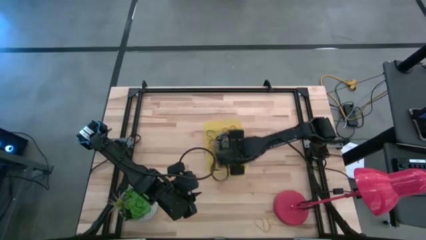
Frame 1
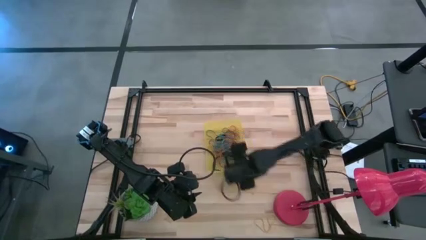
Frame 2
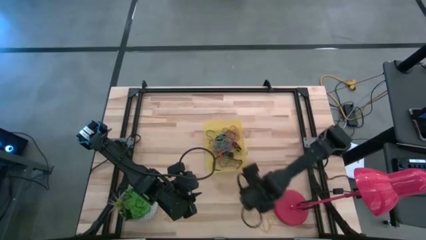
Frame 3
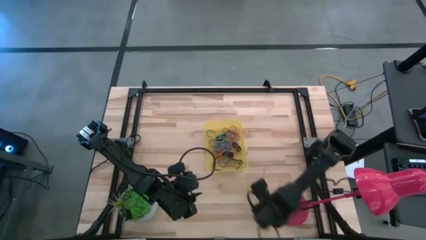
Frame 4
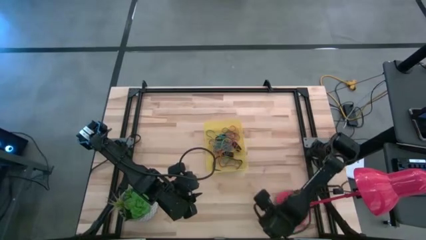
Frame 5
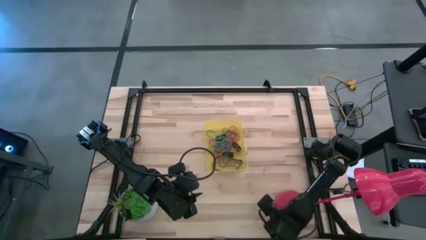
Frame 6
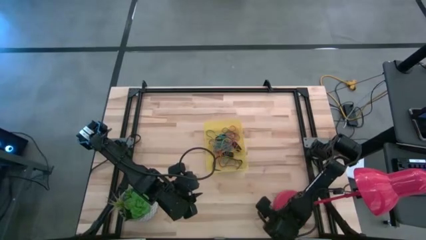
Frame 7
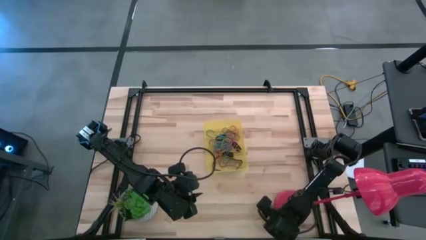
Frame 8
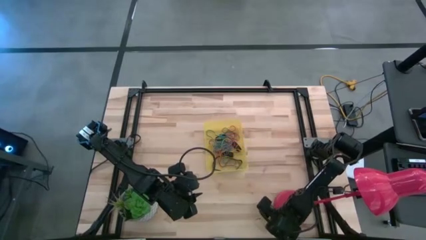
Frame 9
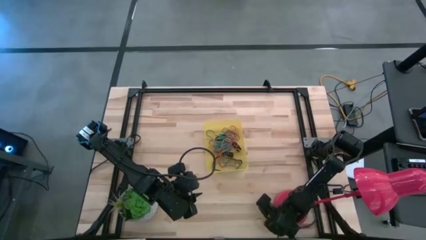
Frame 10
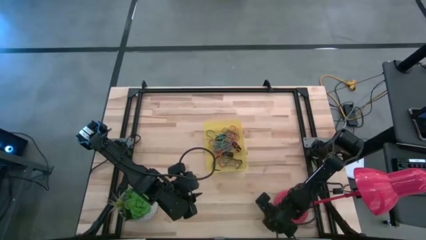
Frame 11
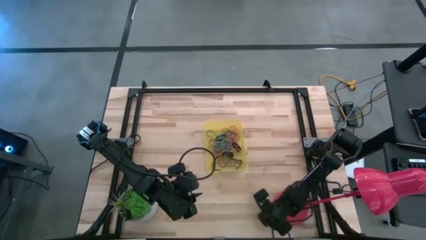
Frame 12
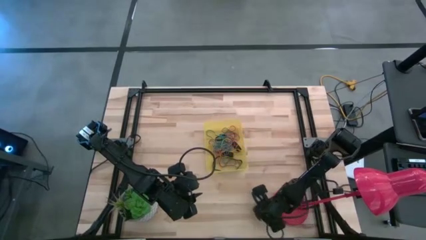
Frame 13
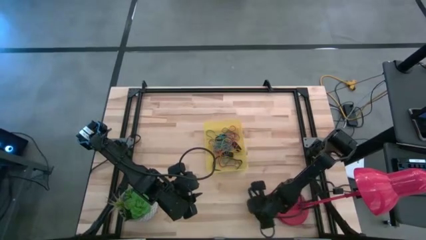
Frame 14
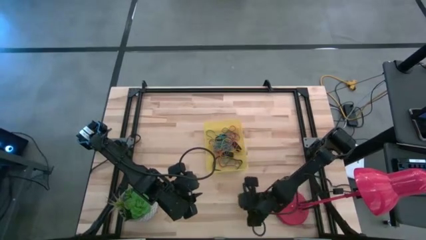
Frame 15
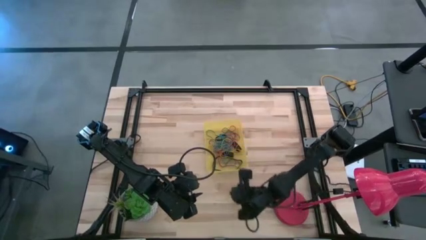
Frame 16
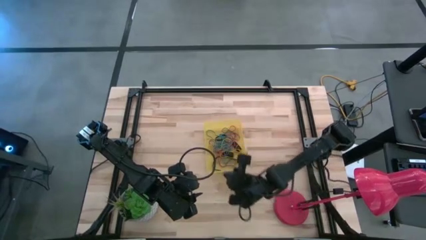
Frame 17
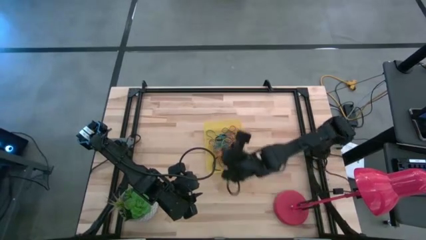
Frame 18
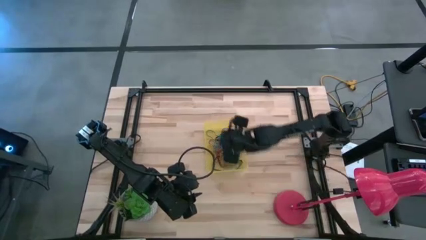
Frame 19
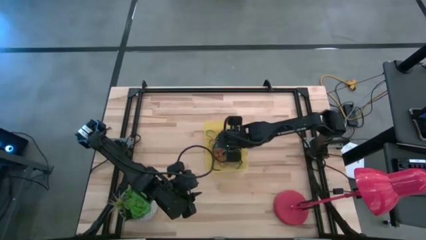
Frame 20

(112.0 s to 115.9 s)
Task: Pick and place rubber bands into bin
Put the yellow rubber band into the yellow bin

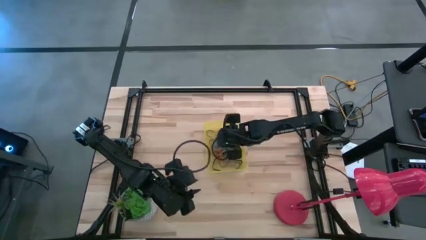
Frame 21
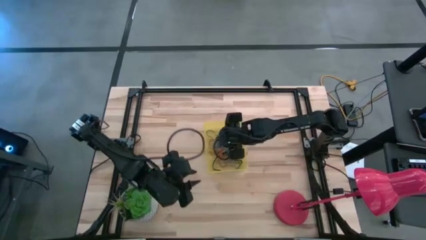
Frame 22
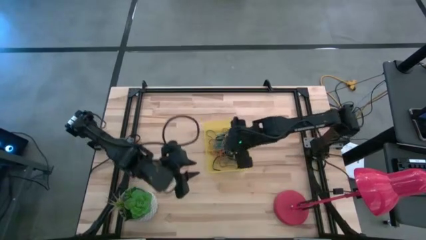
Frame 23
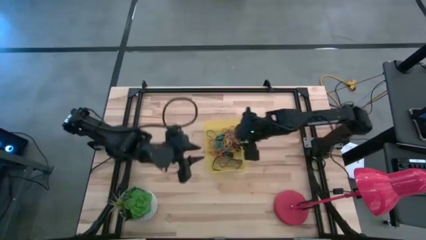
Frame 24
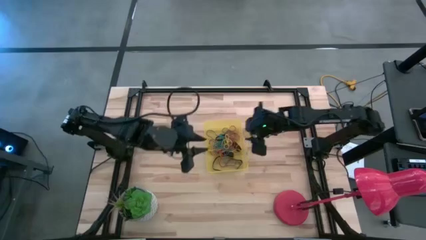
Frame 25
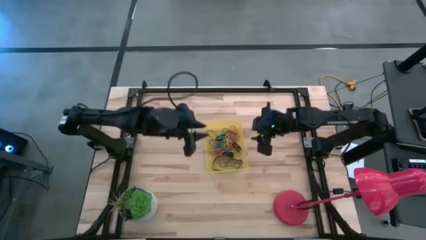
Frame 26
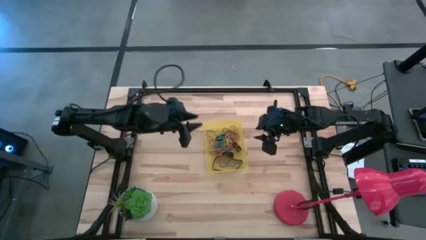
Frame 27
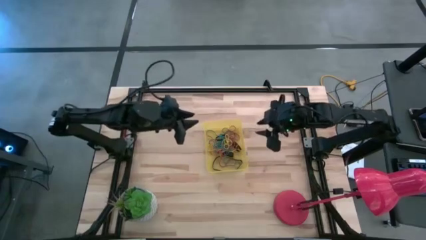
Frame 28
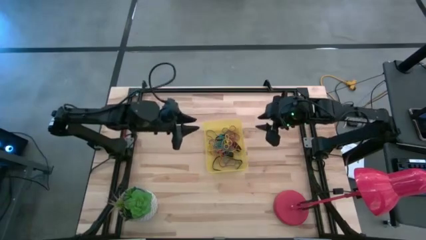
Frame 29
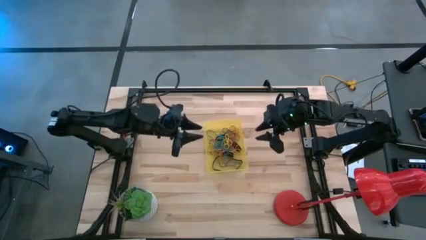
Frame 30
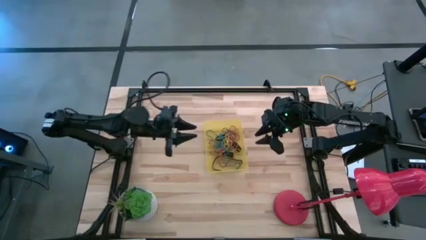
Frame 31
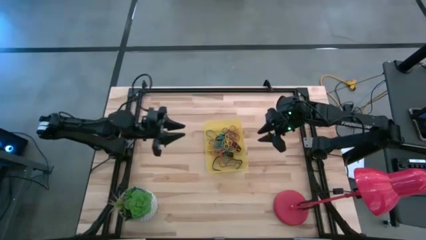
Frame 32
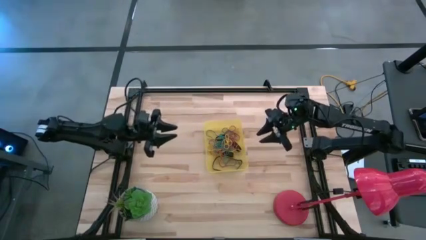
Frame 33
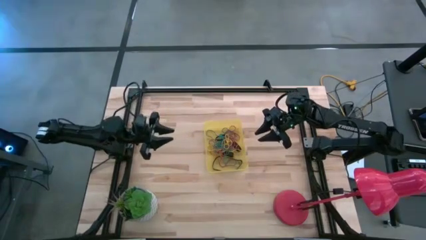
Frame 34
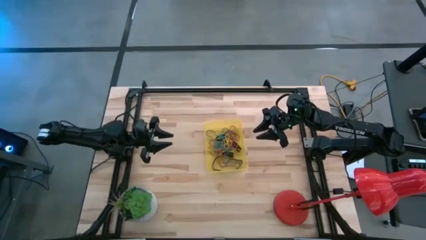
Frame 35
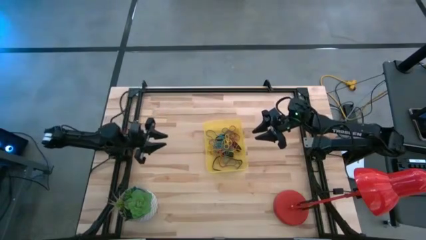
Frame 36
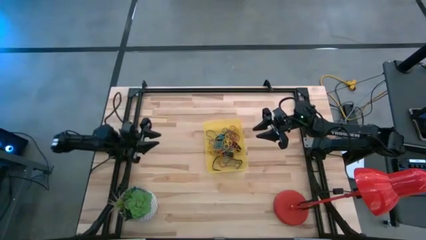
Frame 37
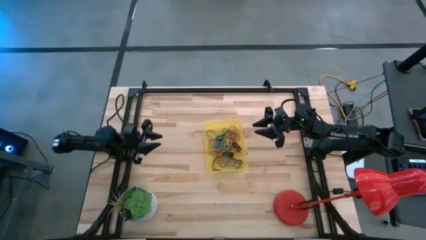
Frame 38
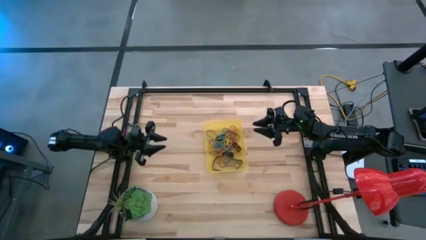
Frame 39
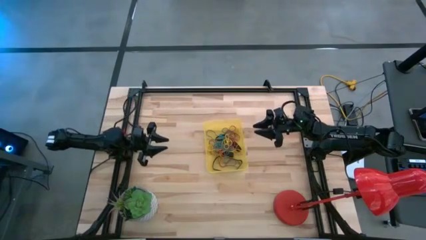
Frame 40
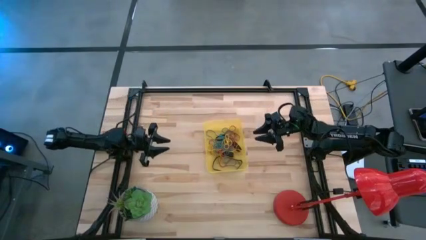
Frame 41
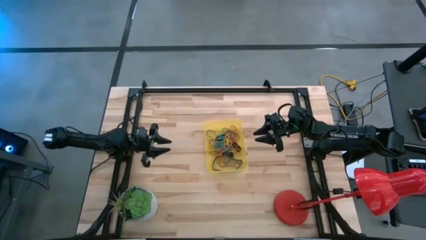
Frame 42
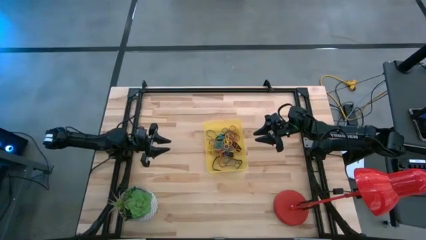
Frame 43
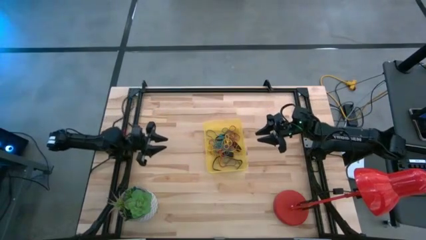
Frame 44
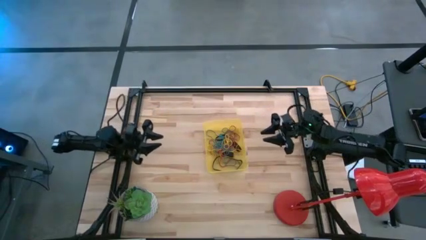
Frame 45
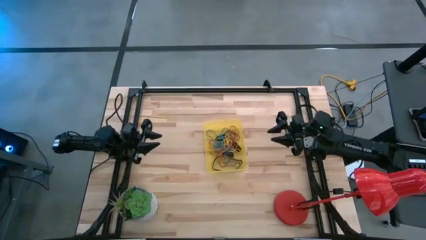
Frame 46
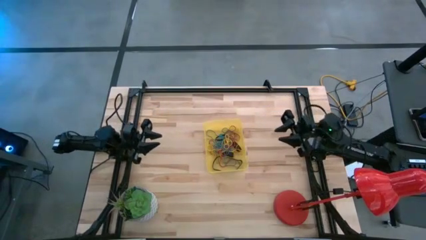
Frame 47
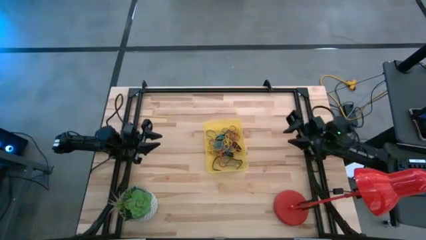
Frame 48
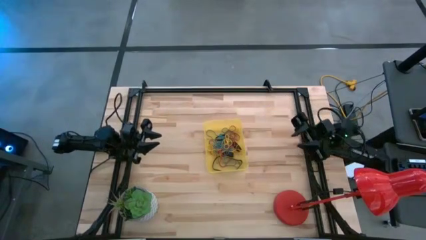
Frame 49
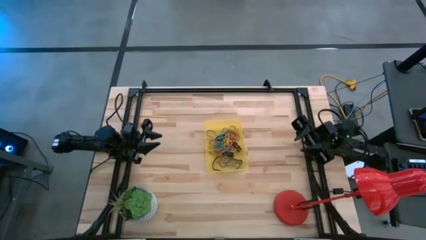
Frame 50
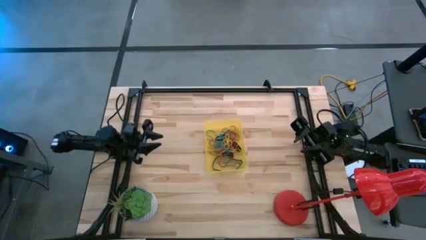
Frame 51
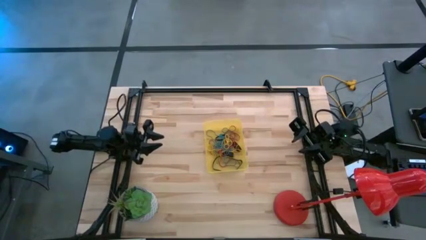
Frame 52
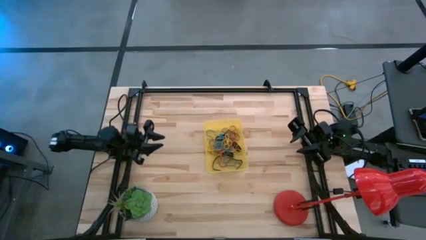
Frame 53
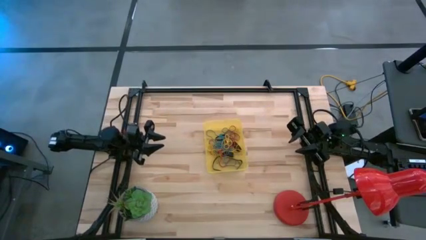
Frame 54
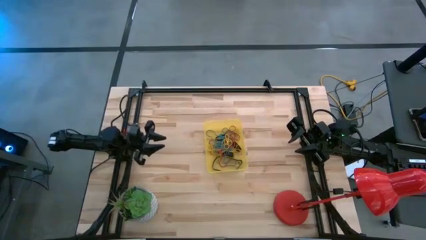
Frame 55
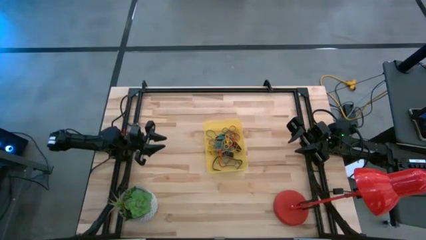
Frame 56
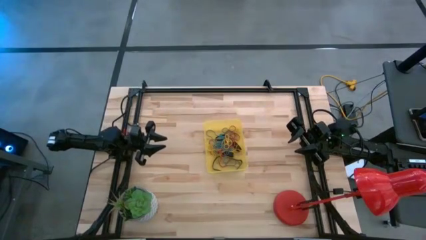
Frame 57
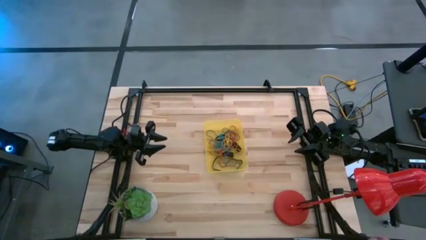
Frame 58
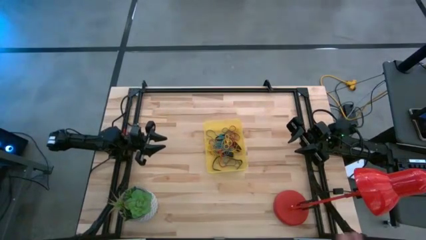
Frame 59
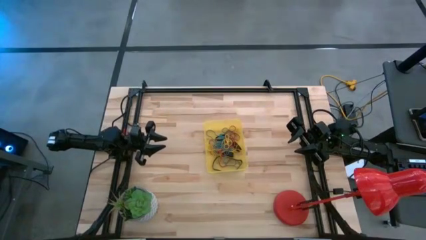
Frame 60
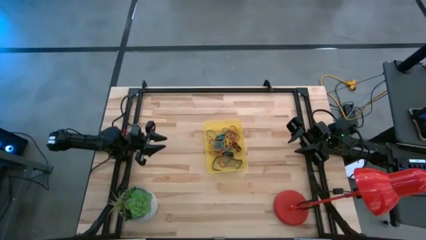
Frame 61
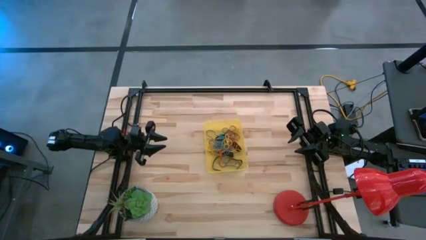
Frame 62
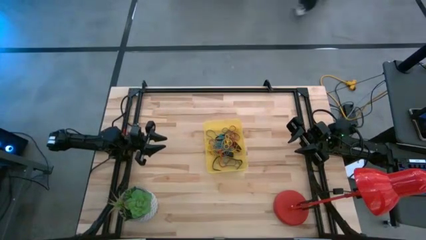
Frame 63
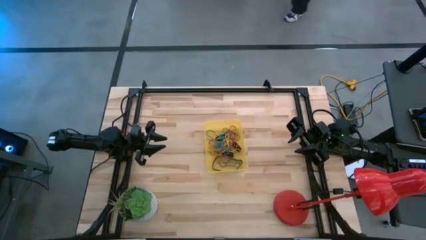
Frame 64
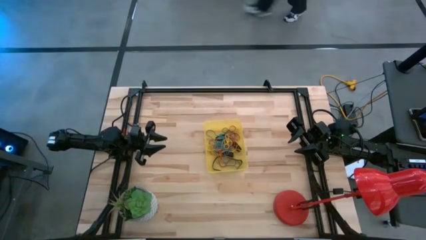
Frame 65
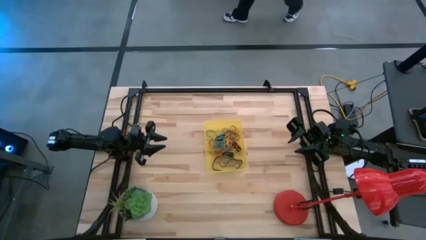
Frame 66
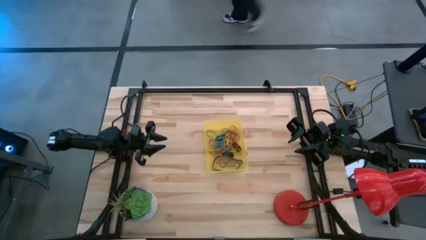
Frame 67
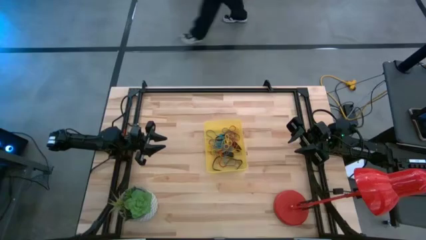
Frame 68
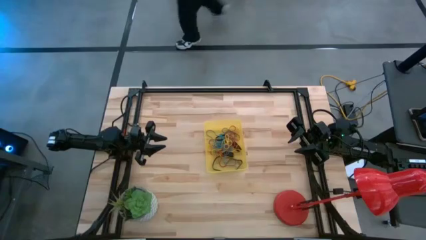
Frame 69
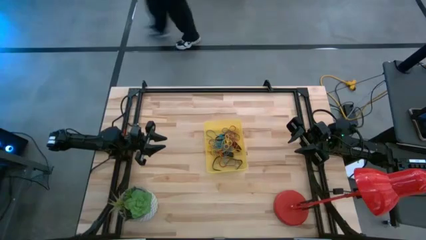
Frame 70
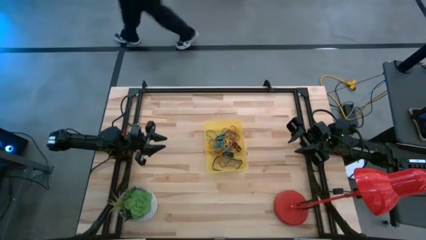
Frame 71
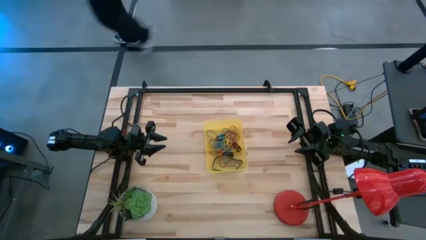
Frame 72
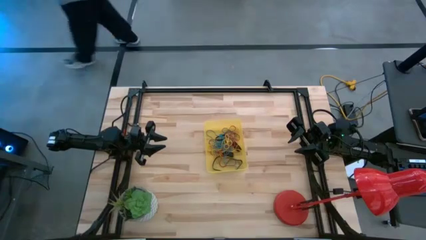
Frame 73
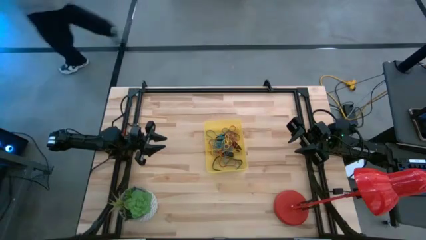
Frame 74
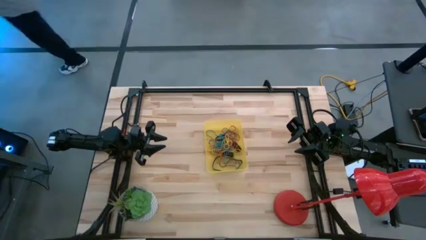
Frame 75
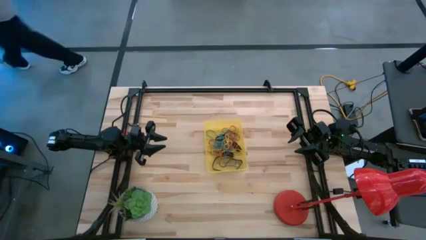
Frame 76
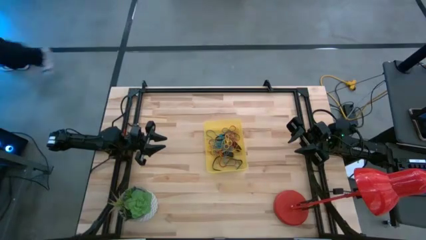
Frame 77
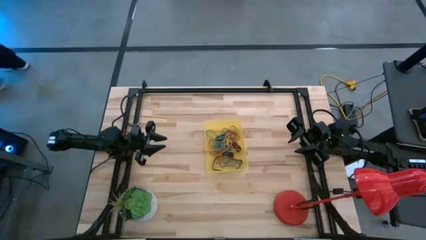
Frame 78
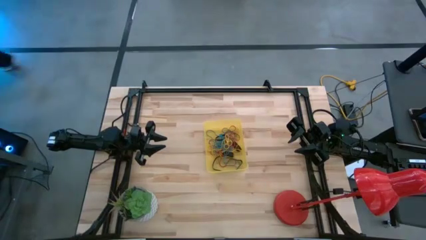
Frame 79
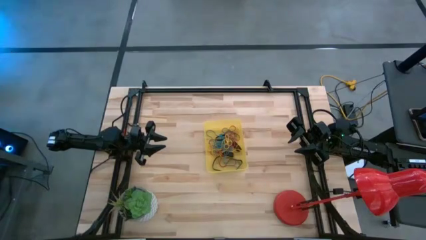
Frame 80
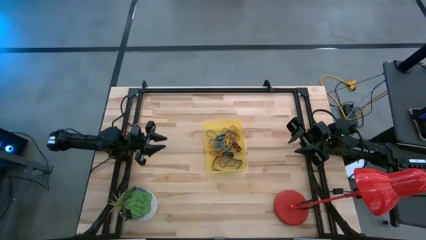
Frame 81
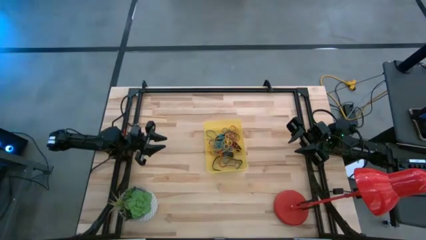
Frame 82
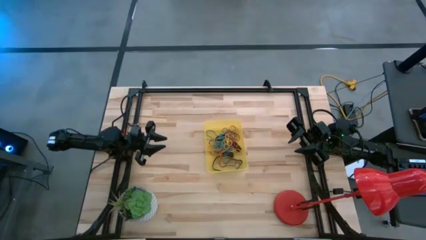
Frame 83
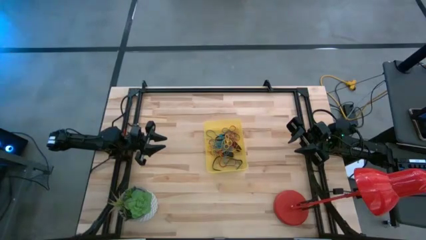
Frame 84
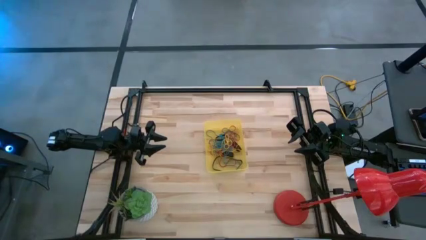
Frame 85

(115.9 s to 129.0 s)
Return to Home Position
